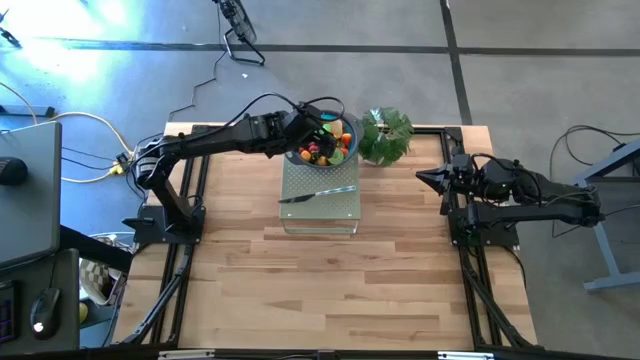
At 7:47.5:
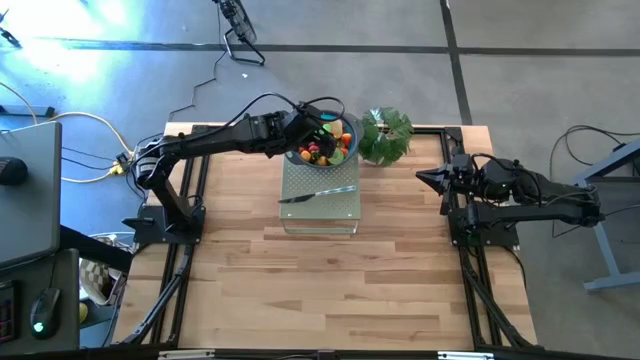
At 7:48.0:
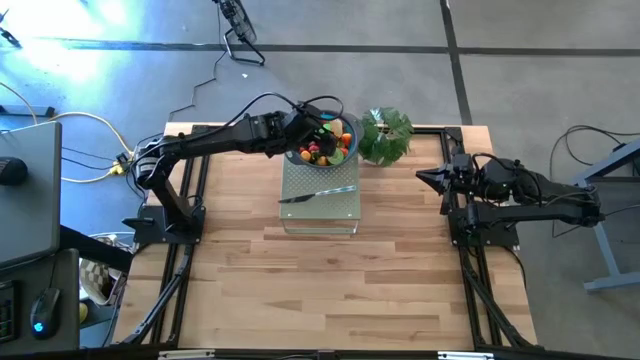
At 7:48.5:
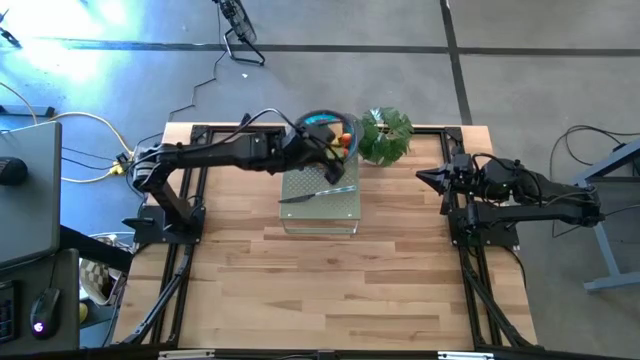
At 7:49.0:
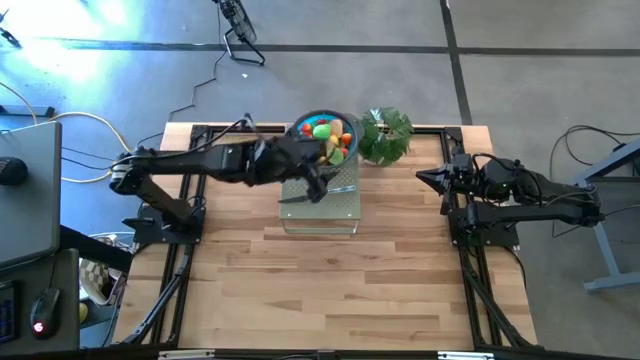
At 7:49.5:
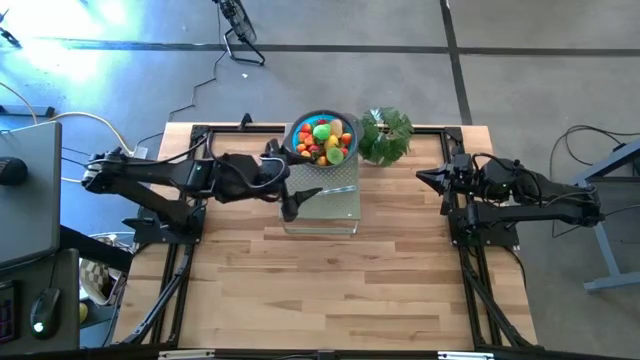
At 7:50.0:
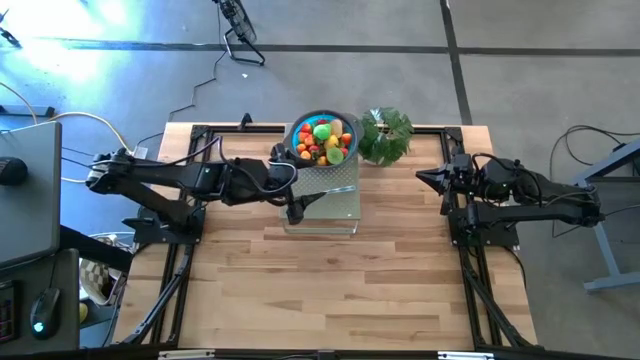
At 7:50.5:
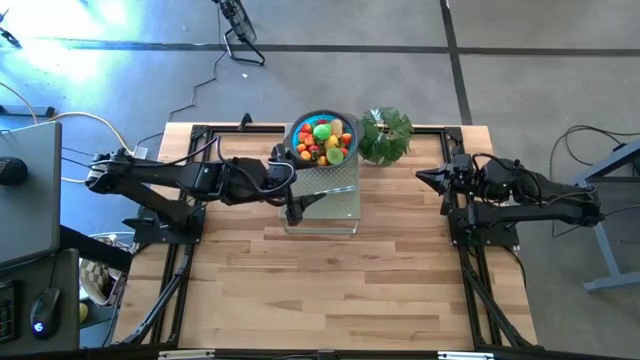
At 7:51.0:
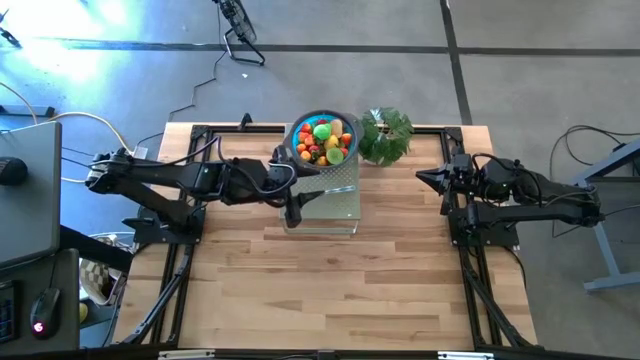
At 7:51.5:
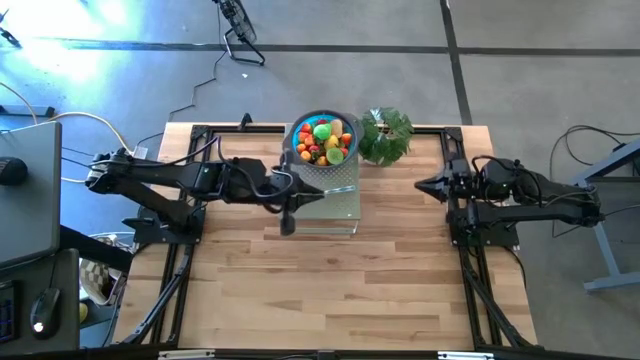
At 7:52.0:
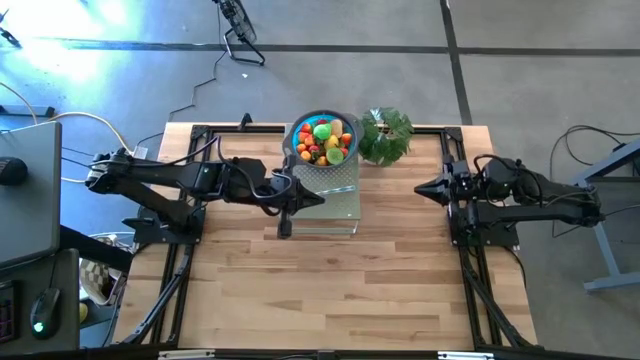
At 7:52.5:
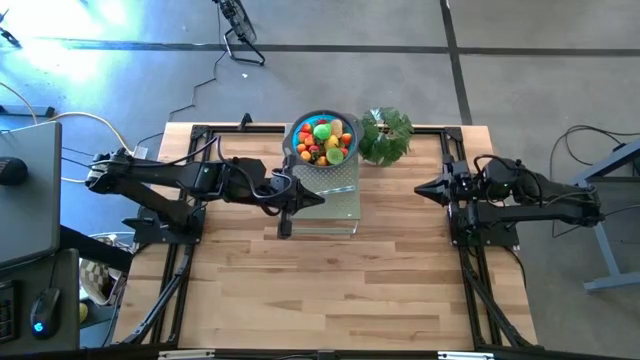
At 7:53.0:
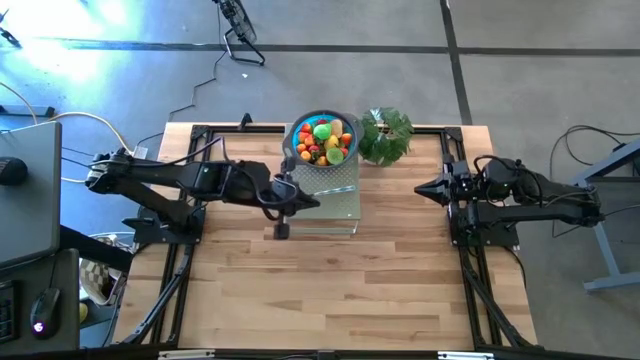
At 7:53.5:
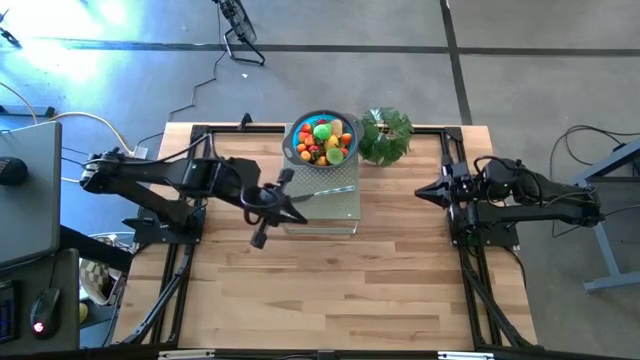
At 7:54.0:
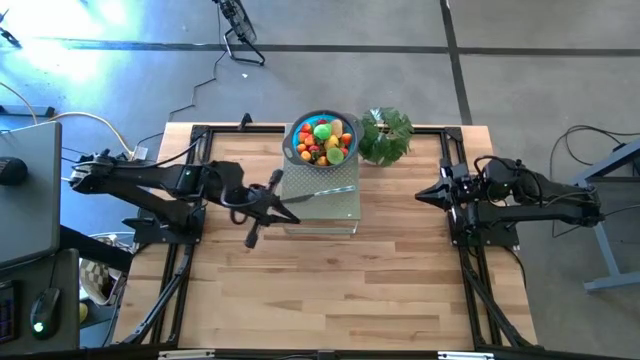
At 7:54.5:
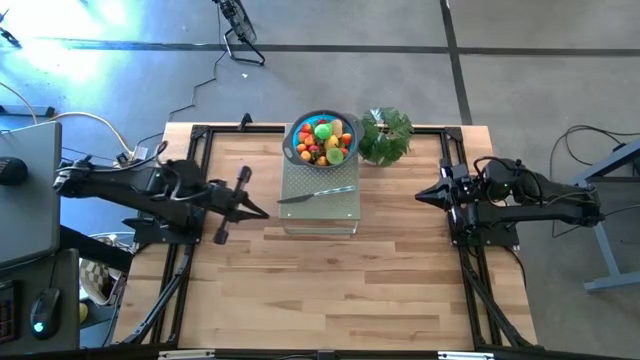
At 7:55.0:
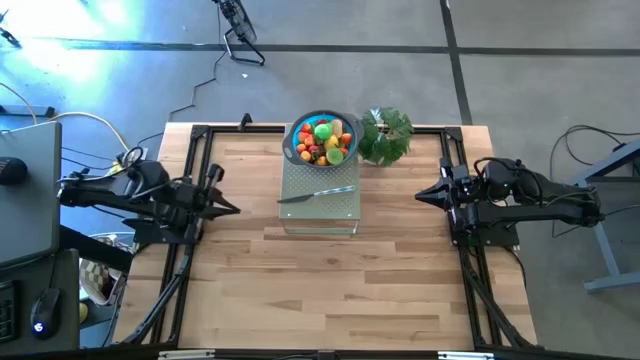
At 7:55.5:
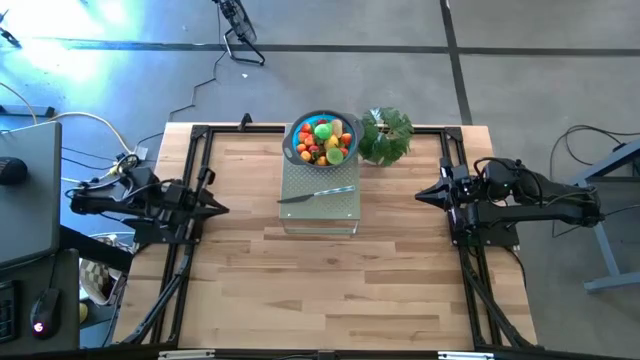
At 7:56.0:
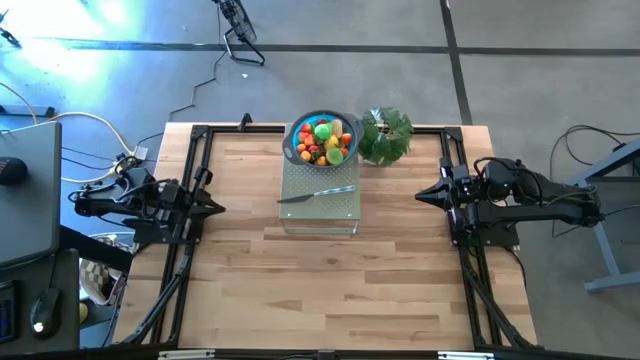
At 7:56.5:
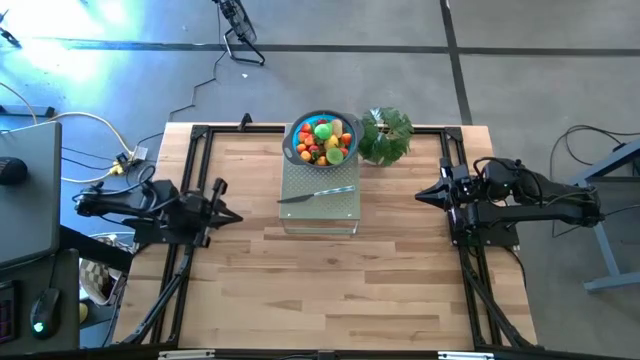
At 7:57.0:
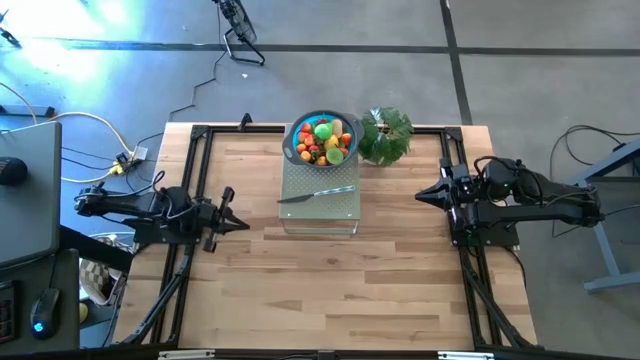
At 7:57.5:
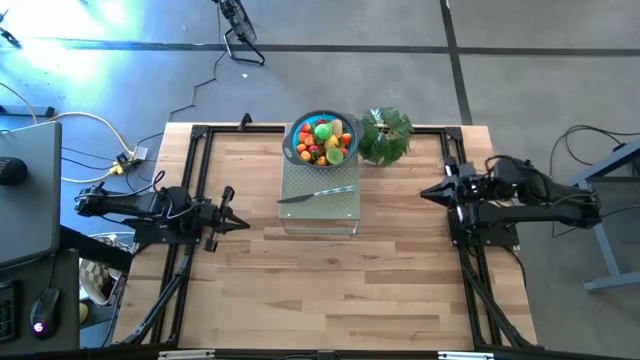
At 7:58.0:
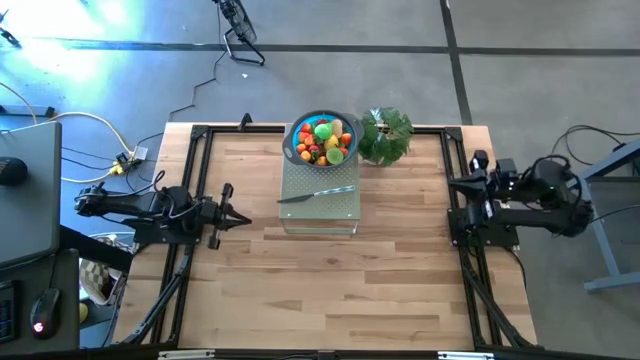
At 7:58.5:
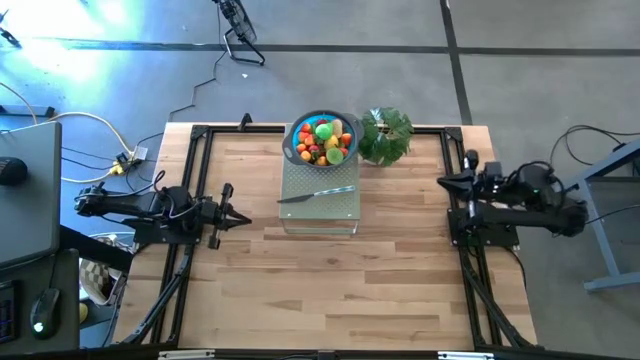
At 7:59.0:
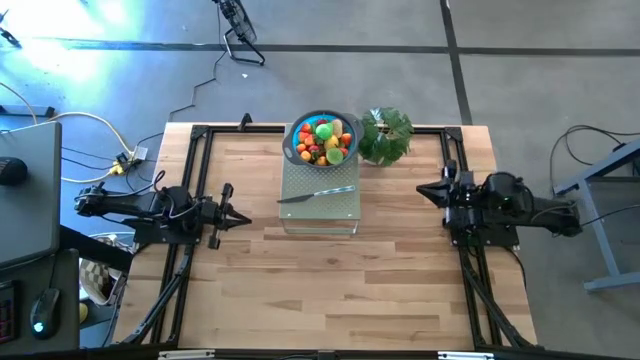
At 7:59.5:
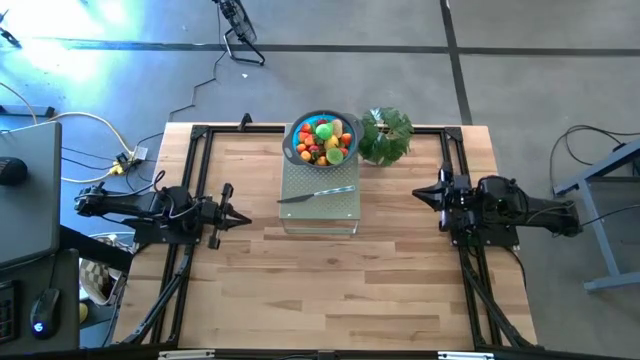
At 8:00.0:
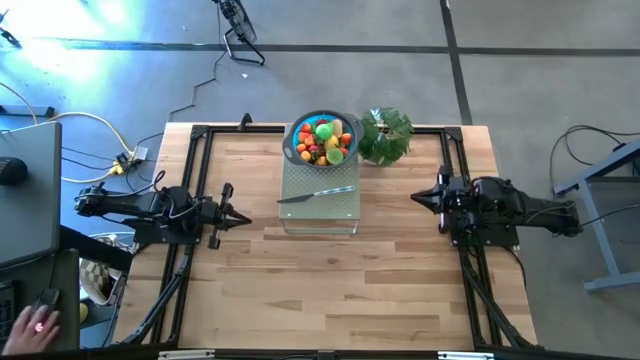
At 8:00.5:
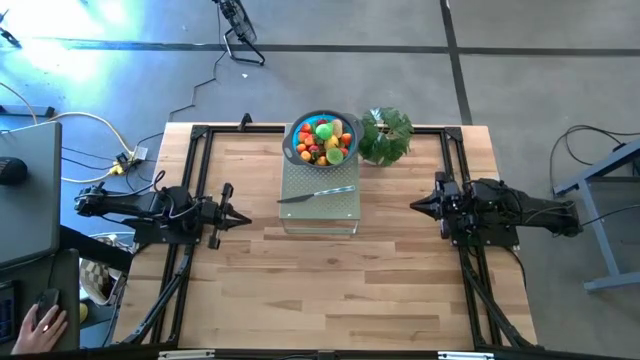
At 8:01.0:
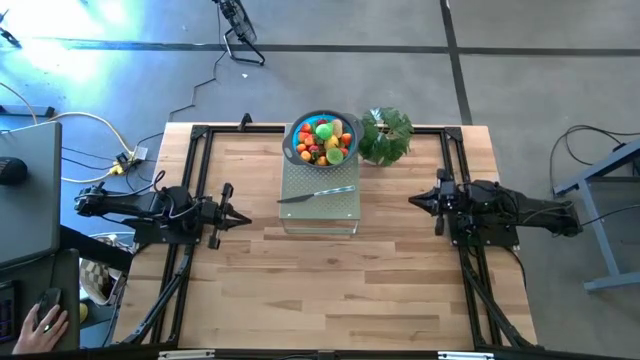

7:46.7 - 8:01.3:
Task: Pick & Place Fruit
Return to Home Position

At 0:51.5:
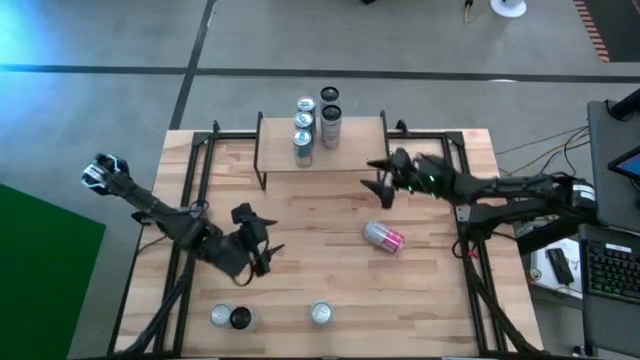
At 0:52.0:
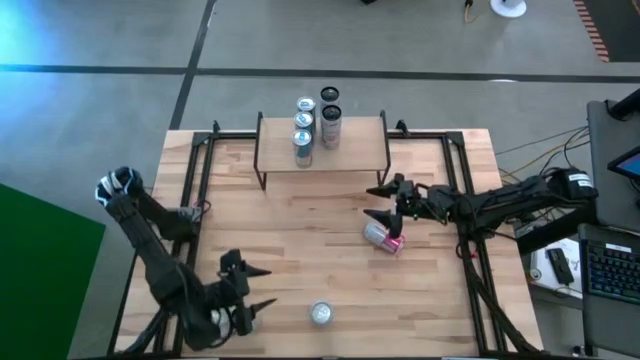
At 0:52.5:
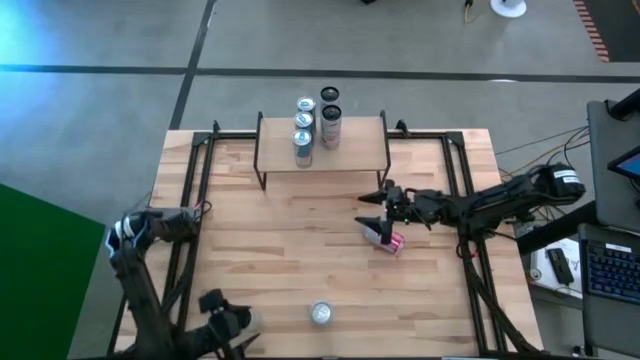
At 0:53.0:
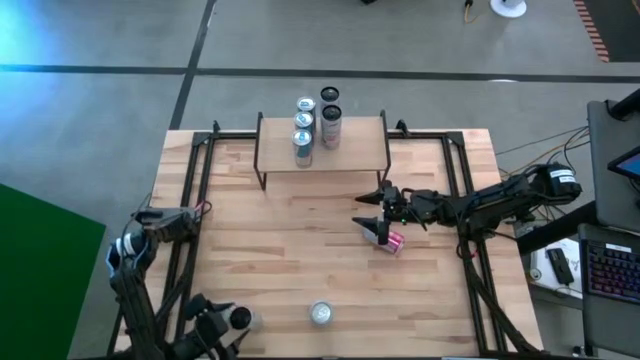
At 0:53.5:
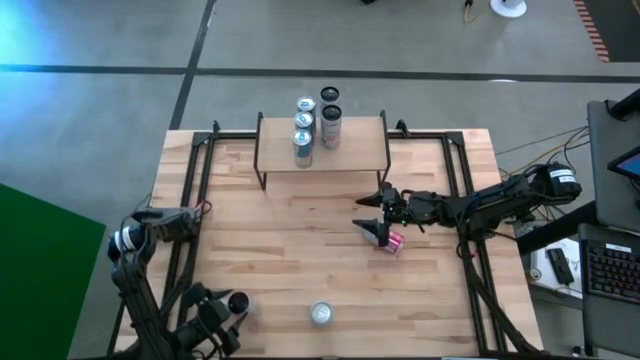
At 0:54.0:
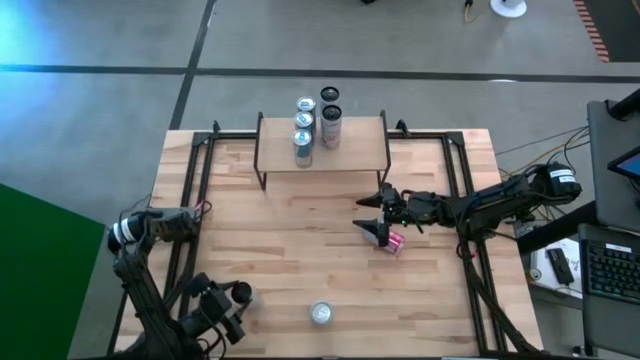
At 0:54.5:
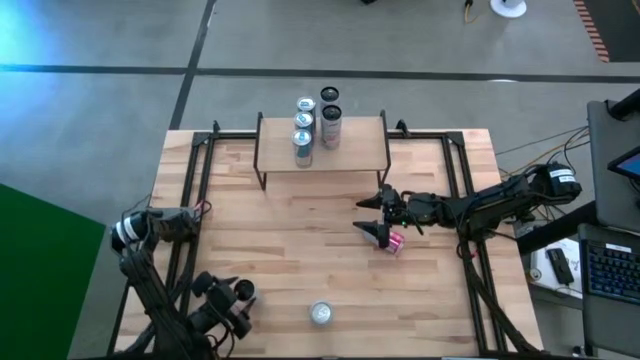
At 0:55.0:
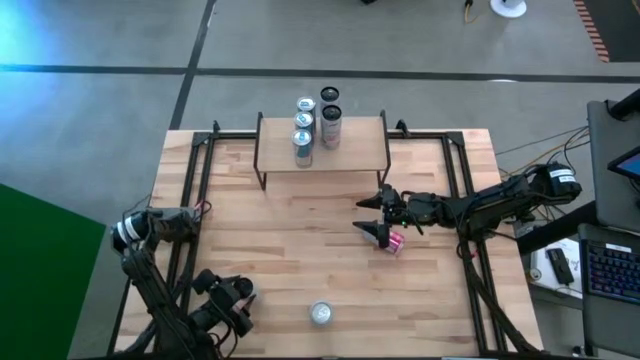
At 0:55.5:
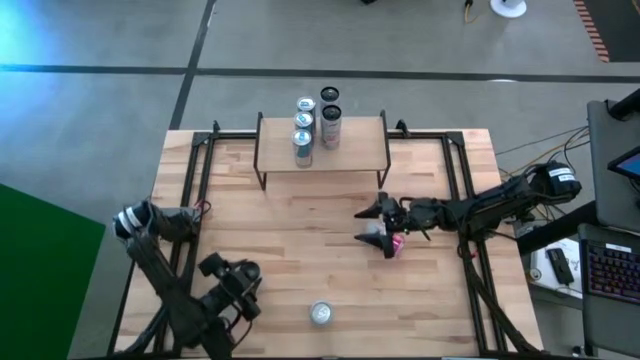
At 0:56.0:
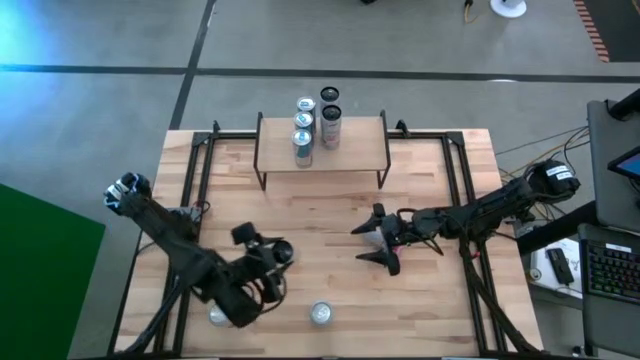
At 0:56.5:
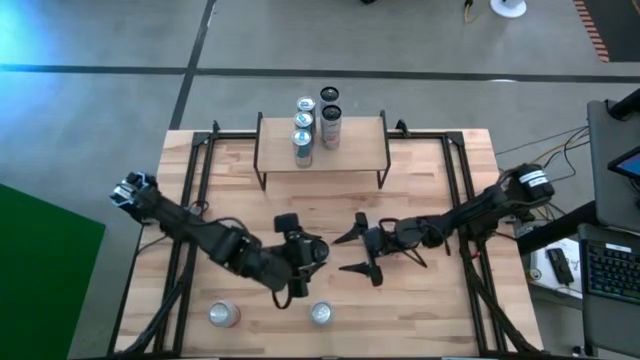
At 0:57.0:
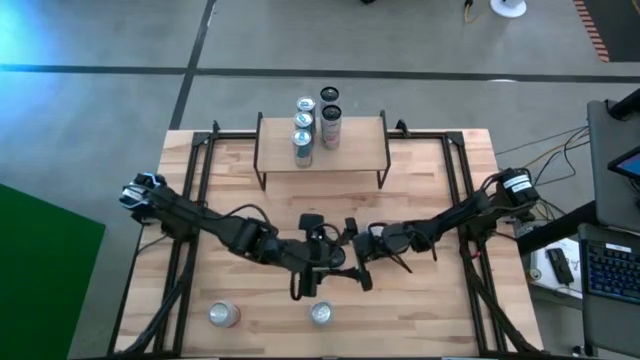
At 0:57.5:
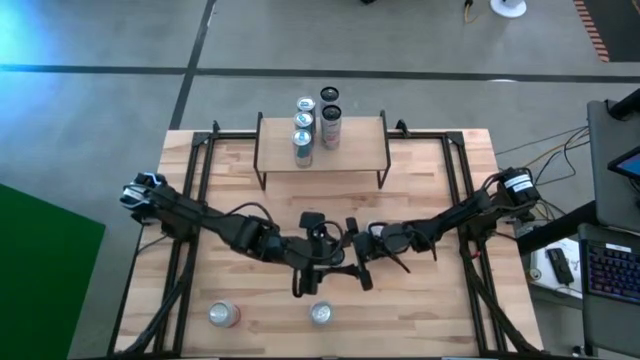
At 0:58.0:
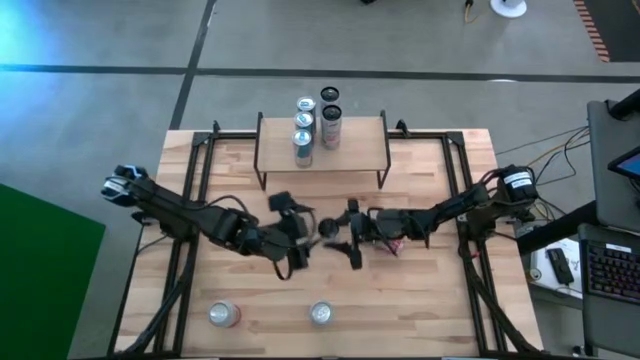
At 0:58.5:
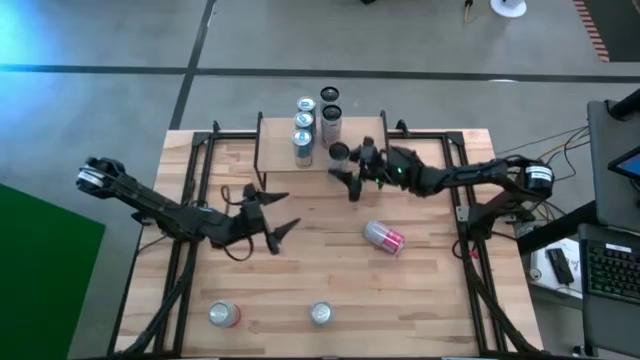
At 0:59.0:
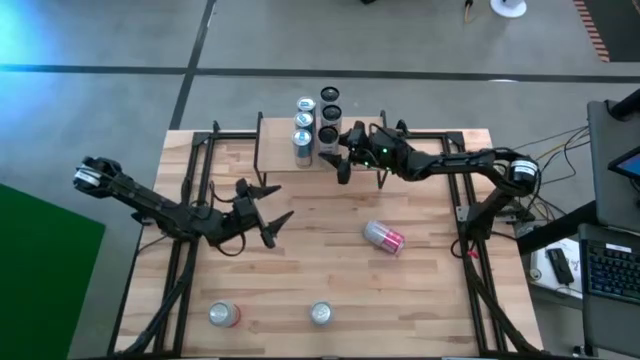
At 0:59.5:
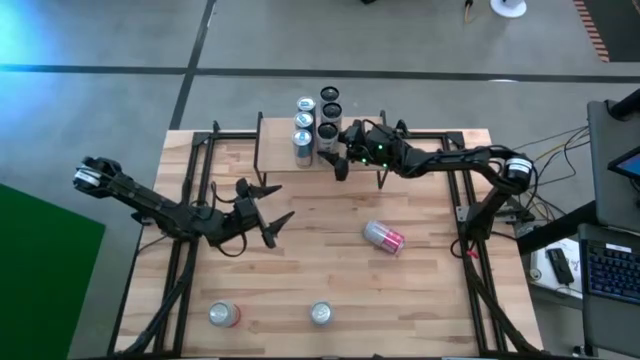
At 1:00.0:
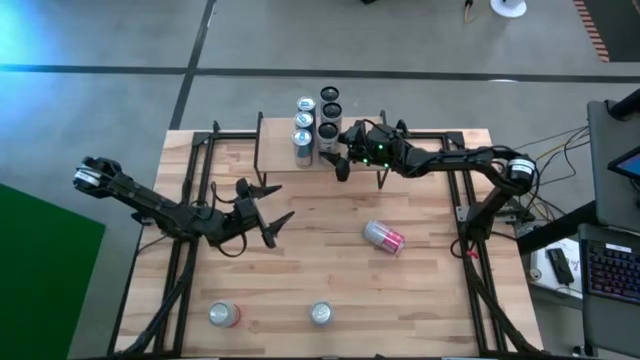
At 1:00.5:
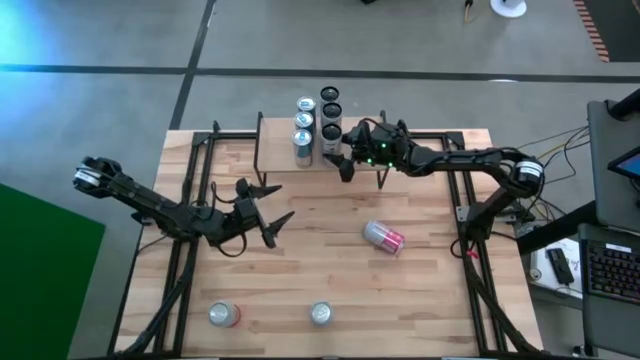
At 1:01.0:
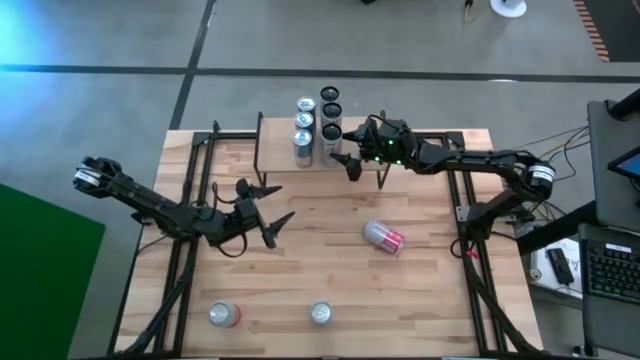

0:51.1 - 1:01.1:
Task: Place canned beverage on shelf
Align the white-pink soda can with the other white-pink soda can on the shelf
